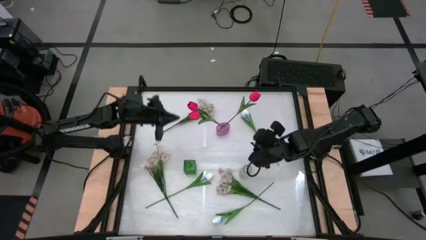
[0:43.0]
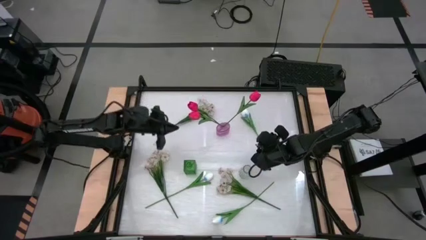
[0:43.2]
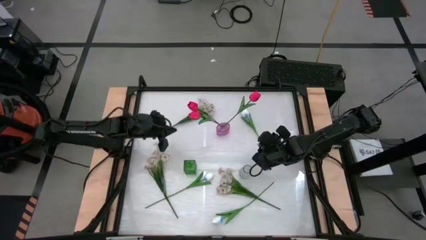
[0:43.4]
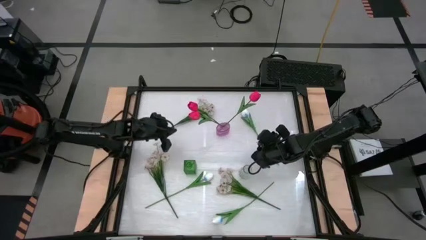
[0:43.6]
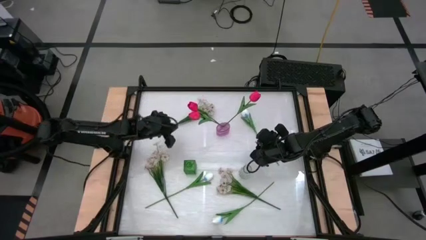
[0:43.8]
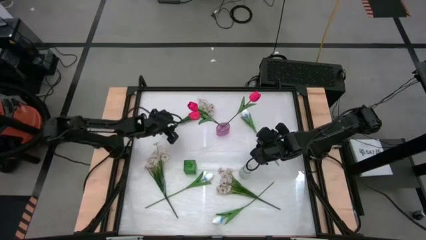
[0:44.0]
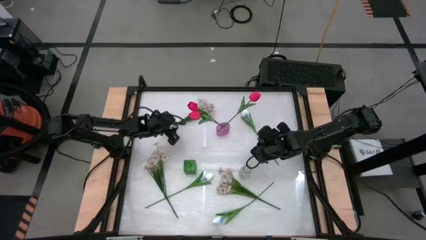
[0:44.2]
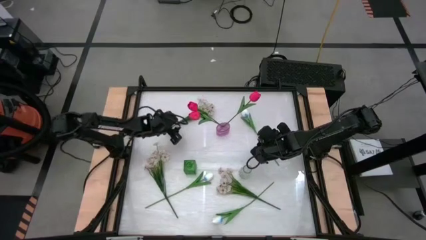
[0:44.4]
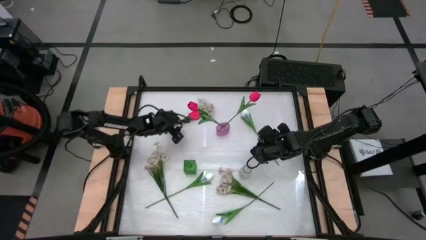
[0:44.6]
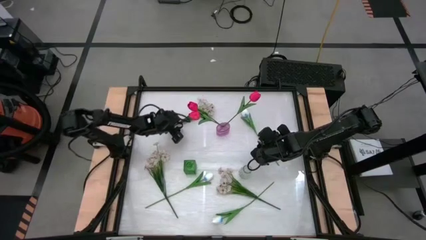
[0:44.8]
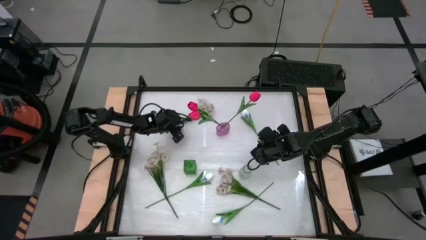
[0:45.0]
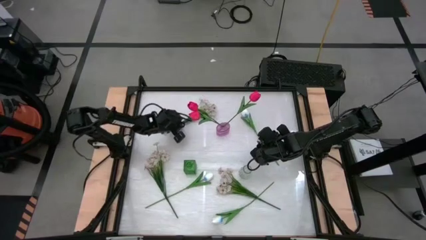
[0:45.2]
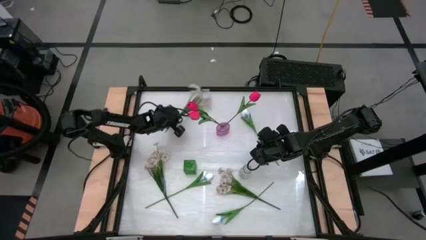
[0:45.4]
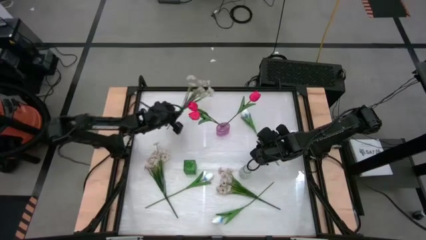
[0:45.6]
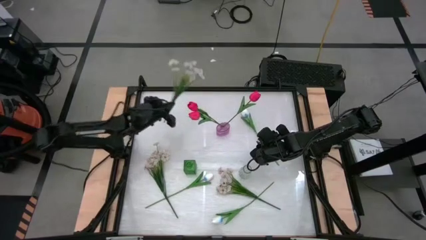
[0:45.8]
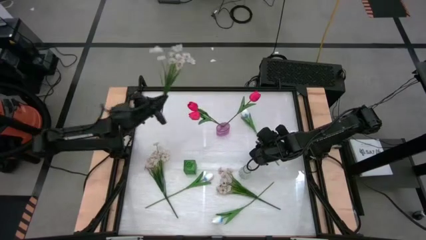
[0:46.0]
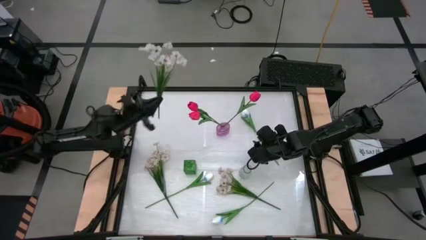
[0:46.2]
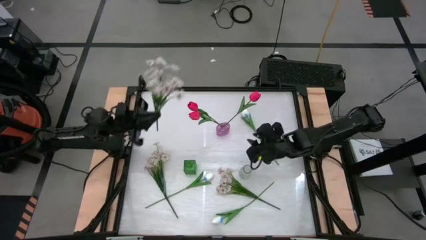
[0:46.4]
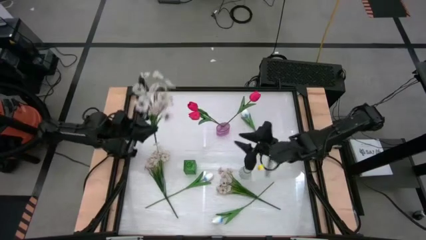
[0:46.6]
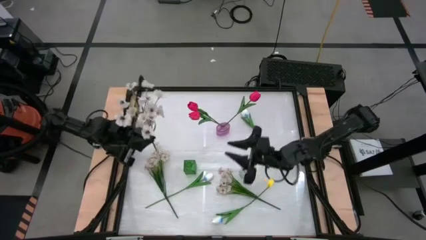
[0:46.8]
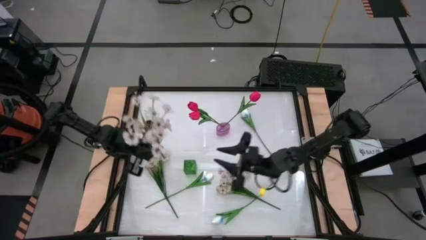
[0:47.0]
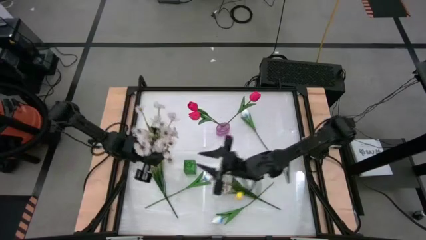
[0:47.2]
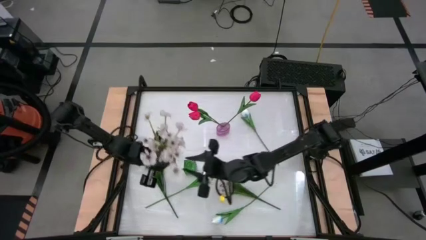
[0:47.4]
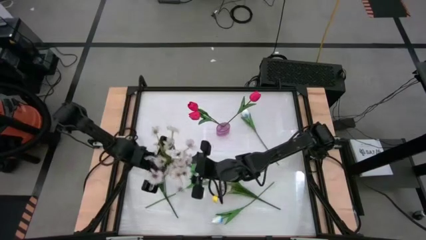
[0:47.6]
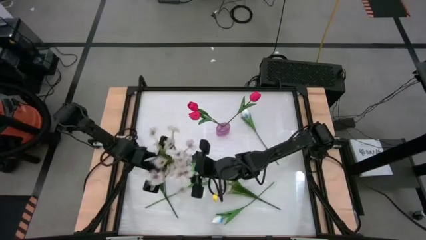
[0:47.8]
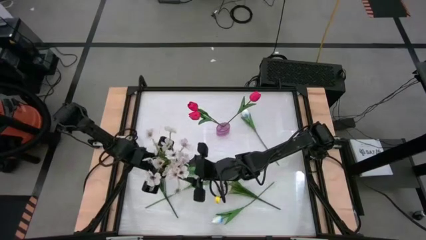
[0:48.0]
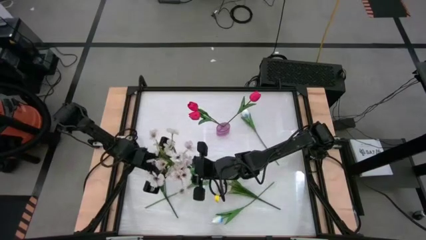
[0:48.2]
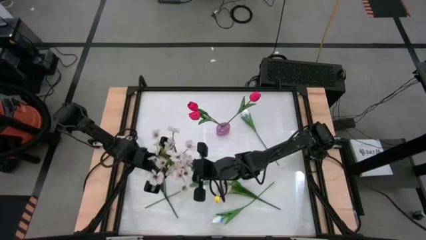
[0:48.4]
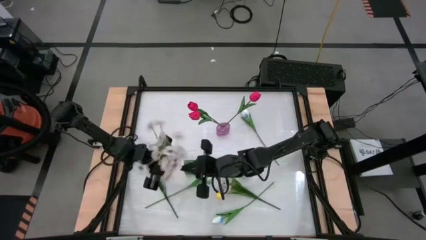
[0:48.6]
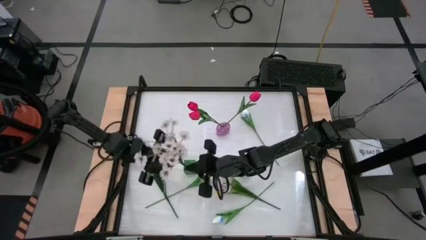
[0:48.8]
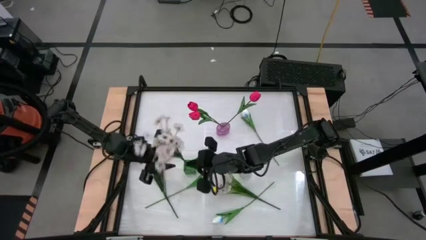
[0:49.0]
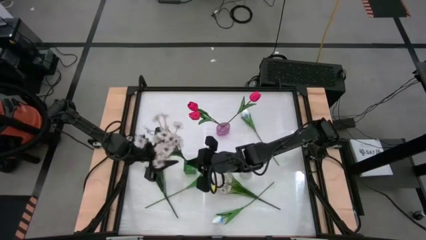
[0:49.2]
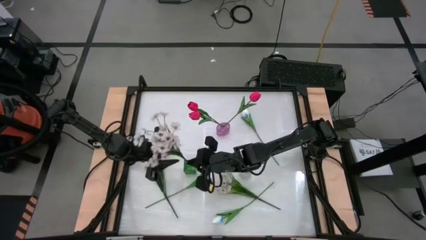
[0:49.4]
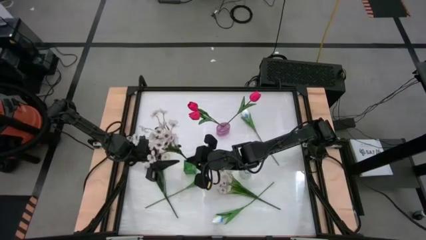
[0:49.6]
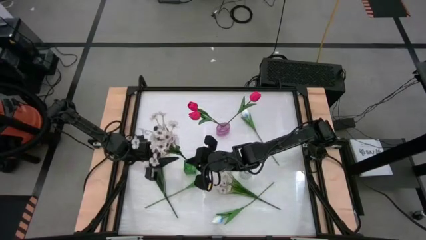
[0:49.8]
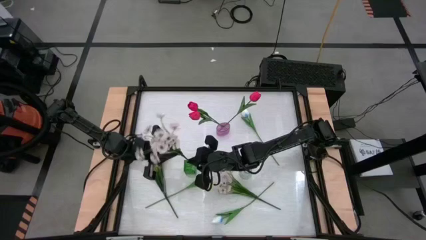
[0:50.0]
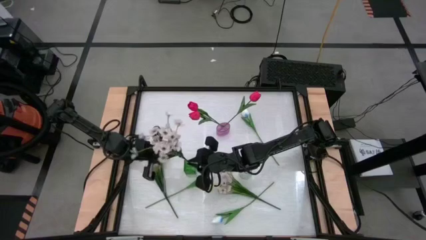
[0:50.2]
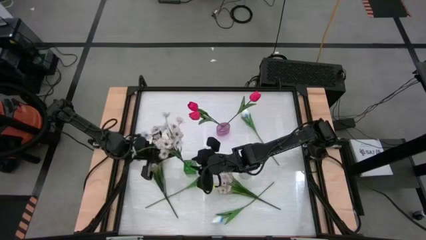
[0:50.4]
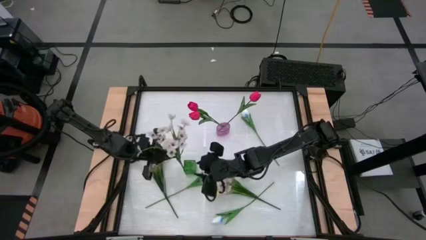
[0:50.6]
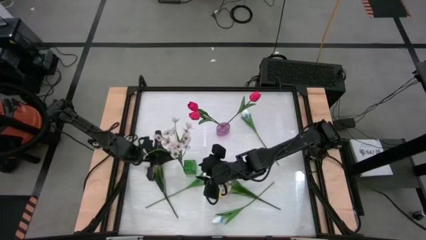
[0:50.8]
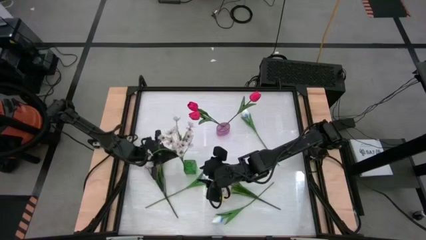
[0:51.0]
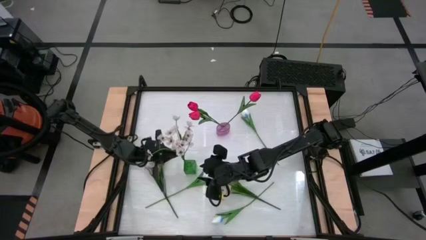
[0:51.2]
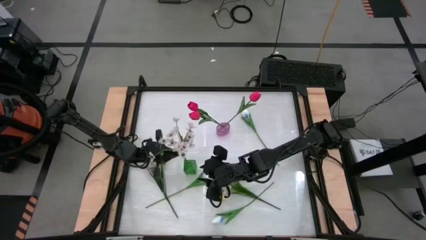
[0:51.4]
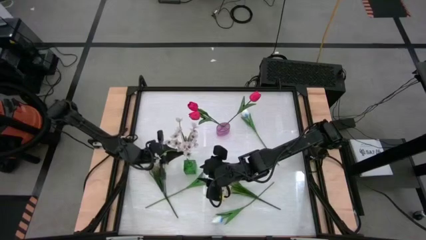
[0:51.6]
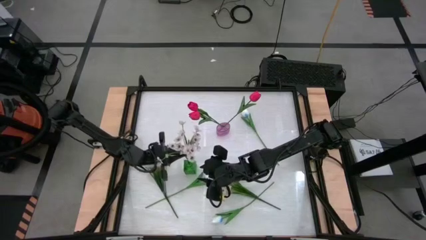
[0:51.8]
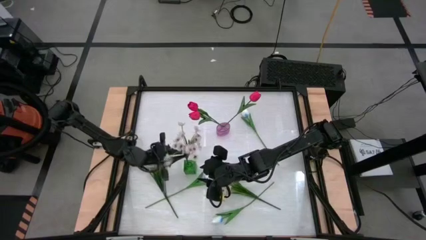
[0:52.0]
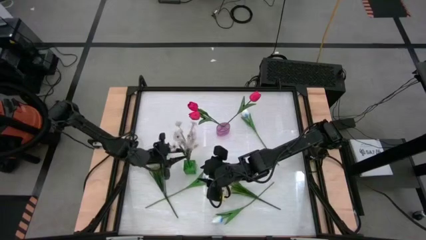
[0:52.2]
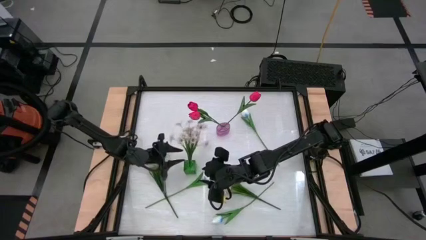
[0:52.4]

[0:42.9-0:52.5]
Task: Sort flowers into vase by color
Put the top white flowers into the green vase

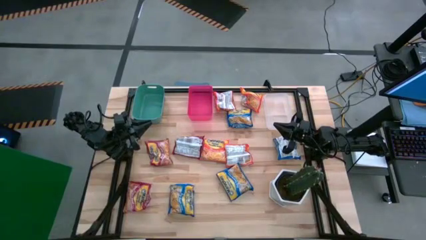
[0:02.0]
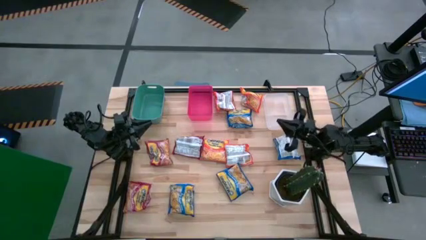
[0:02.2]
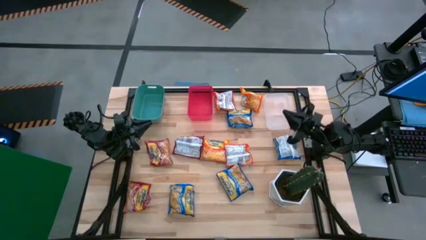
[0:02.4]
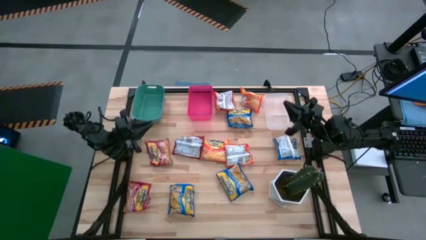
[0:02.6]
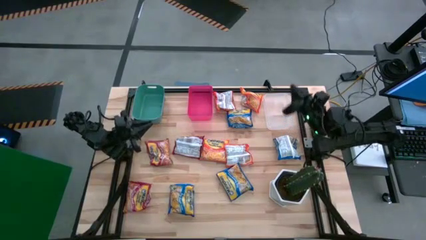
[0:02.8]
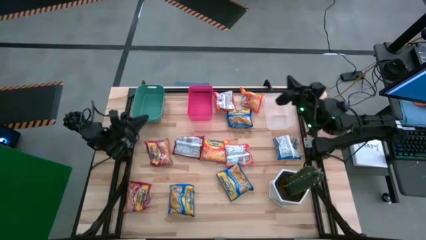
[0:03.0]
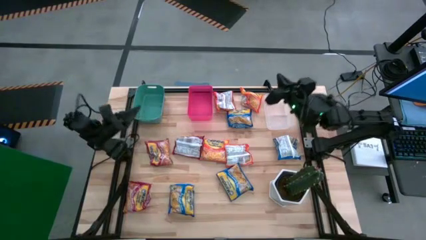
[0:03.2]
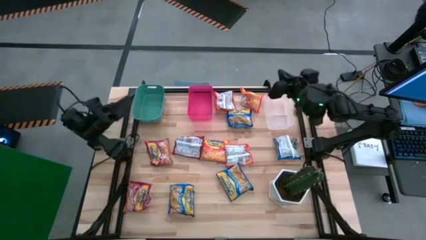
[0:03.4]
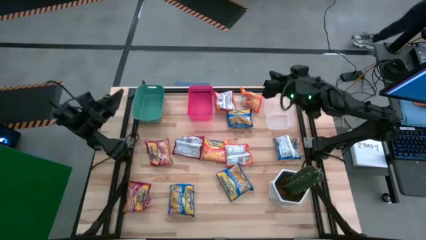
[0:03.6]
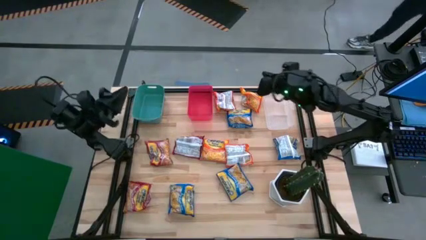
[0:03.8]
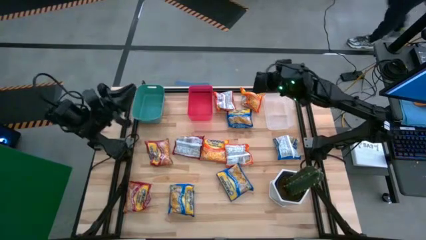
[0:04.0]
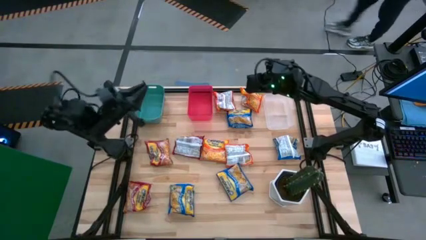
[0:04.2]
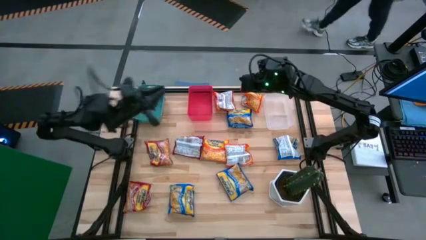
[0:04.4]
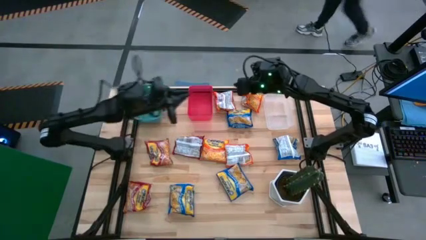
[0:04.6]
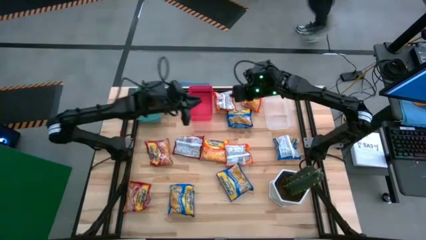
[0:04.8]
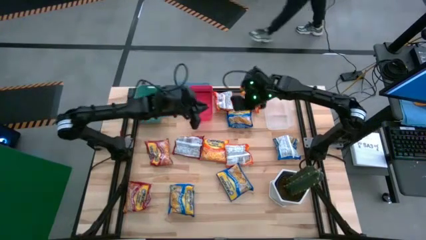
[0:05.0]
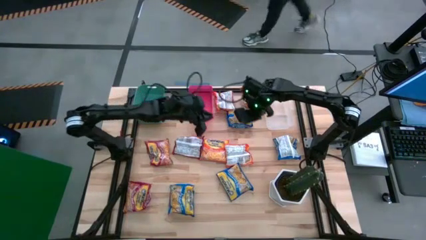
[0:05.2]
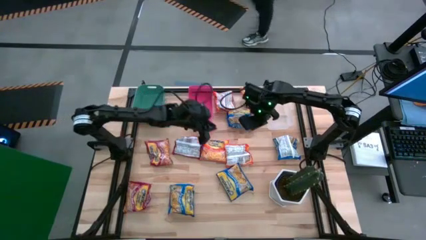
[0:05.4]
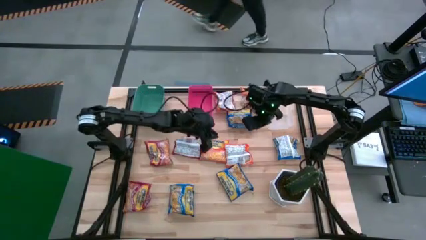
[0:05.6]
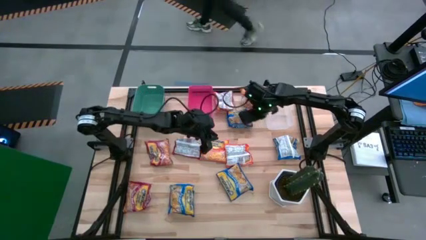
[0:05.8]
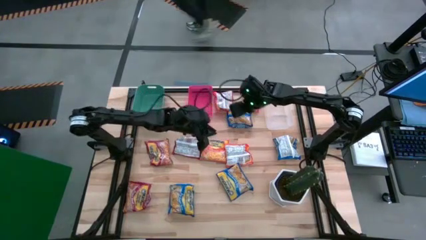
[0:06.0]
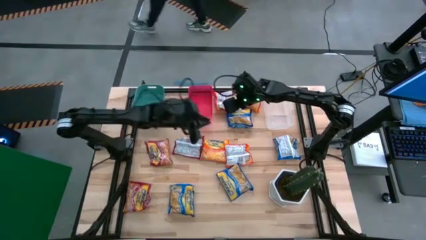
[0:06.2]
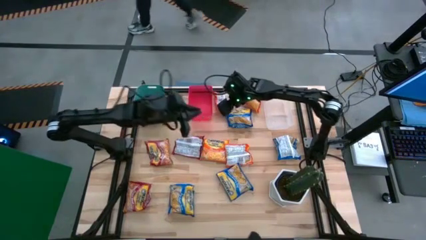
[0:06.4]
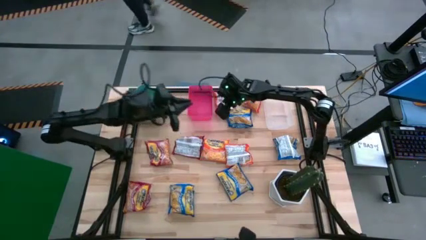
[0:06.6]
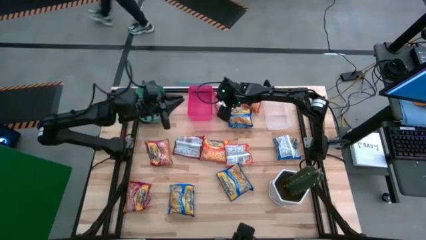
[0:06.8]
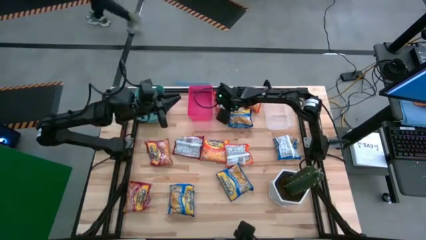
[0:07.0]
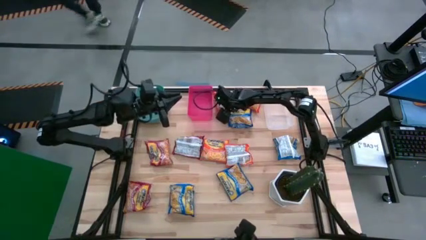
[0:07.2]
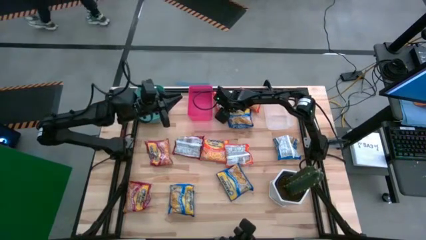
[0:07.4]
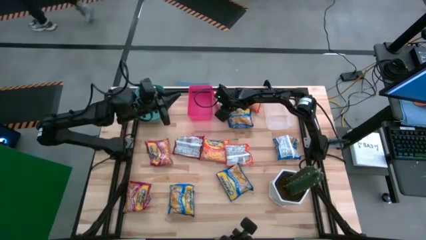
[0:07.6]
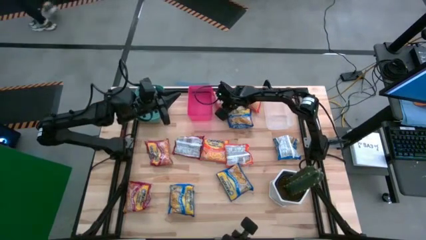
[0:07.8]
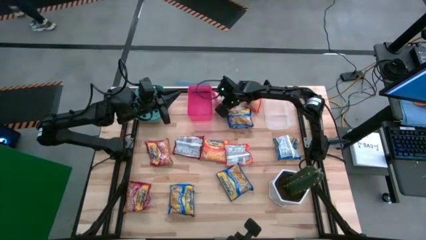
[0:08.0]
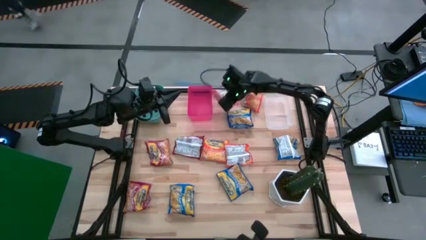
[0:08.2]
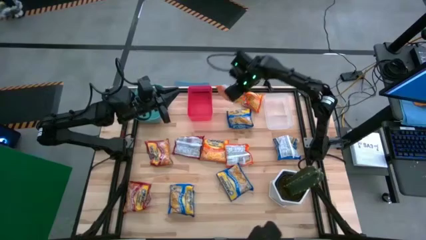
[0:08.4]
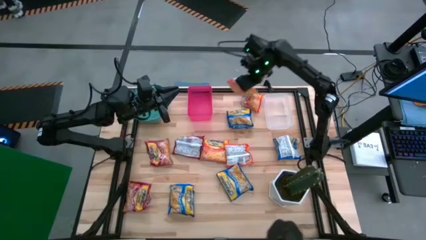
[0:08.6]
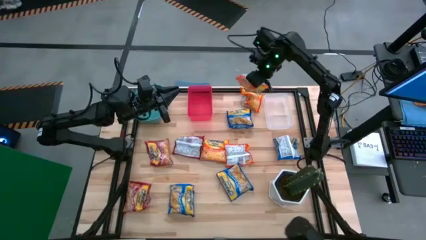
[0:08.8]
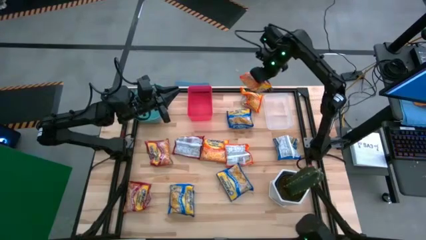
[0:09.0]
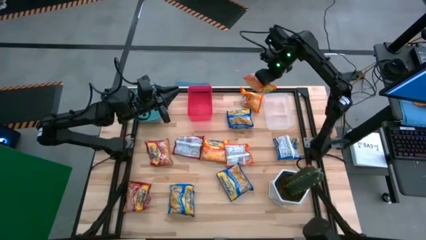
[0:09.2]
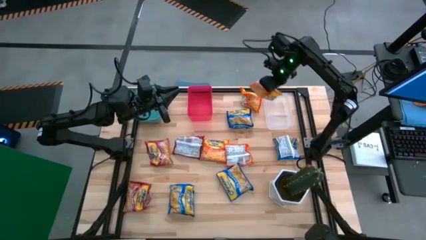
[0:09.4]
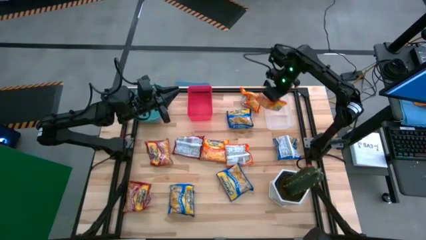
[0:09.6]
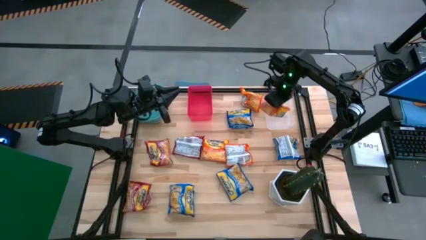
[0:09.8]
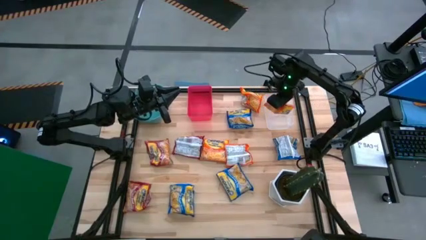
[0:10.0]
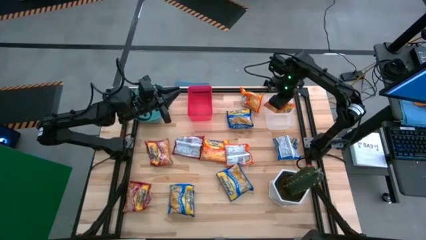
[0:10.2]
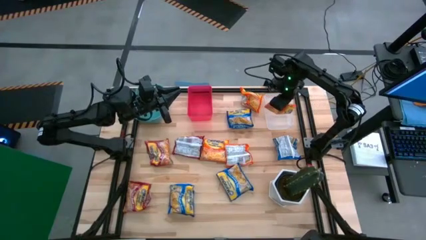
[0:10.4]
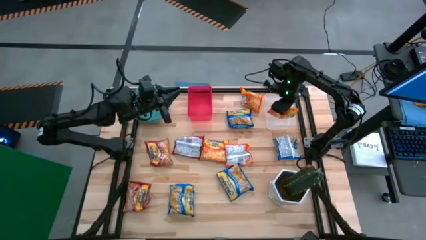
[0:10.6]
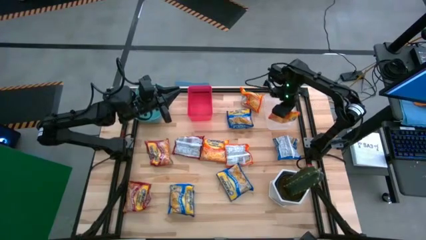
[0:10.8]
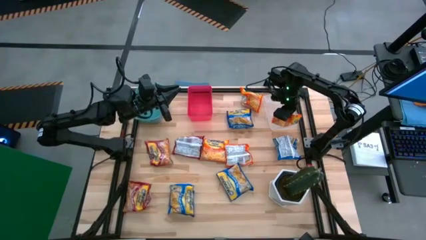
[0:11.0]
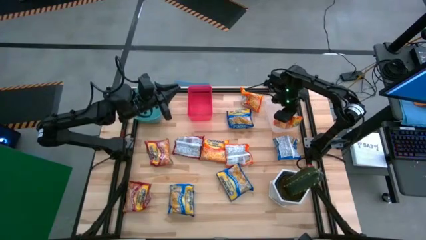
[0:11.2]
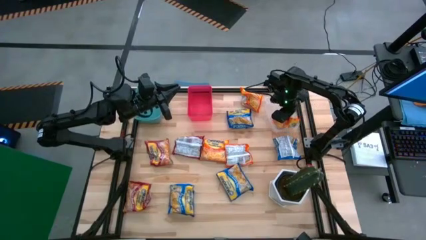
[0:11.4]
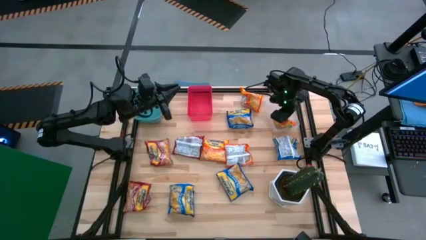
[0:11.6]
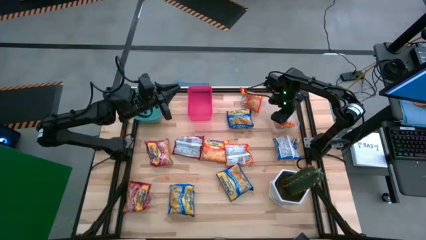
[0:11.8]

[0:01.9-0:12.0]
Task: Sort Maruchan noodles
Put the orange noodle pack into the transparent bin
